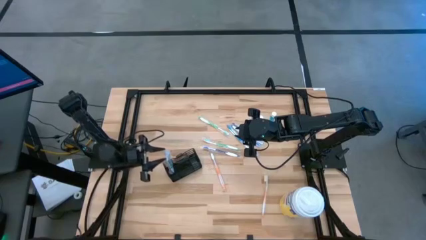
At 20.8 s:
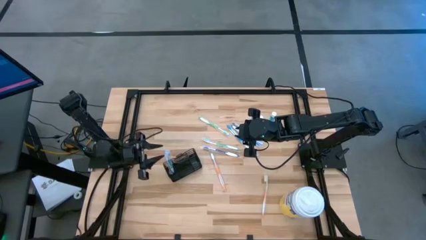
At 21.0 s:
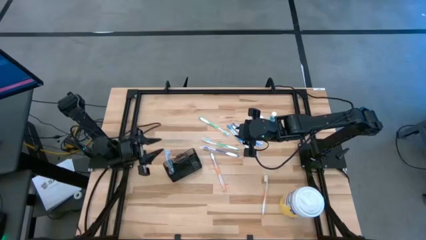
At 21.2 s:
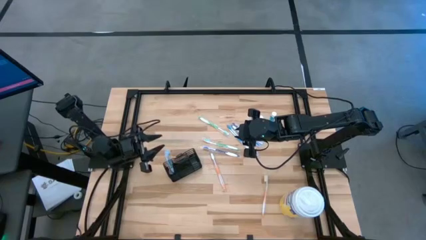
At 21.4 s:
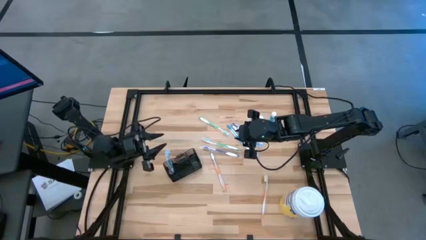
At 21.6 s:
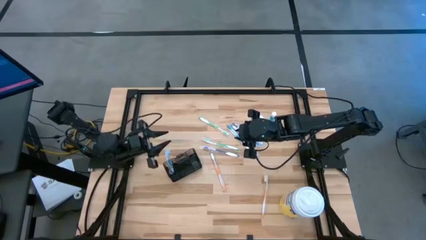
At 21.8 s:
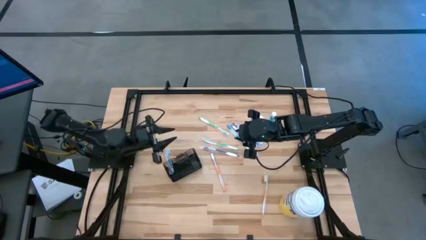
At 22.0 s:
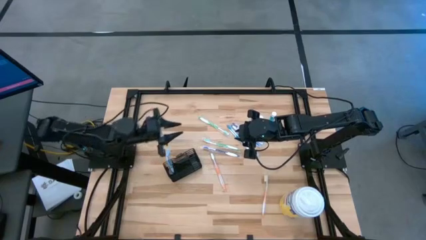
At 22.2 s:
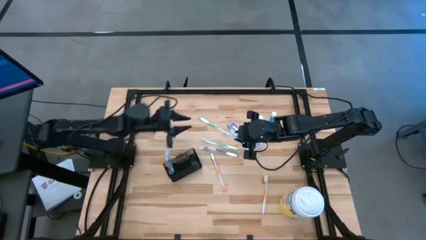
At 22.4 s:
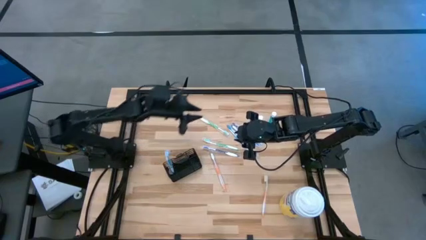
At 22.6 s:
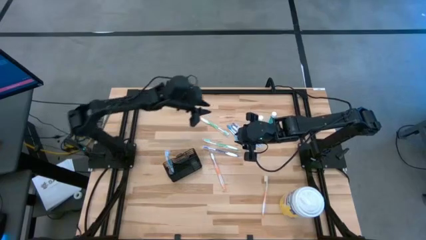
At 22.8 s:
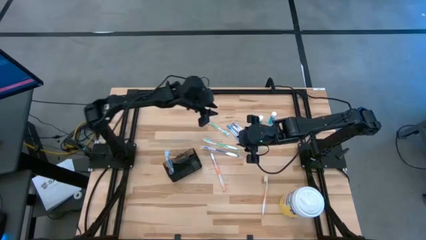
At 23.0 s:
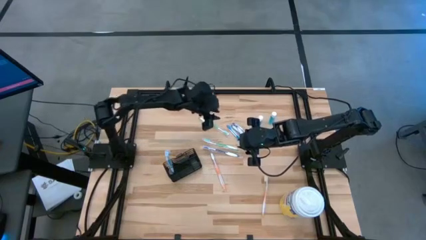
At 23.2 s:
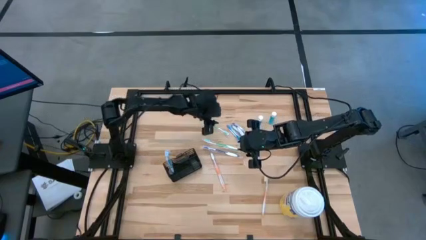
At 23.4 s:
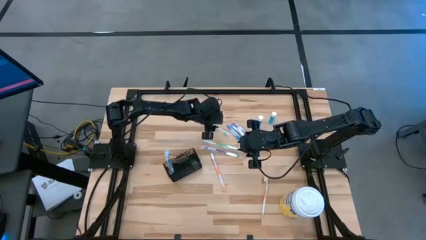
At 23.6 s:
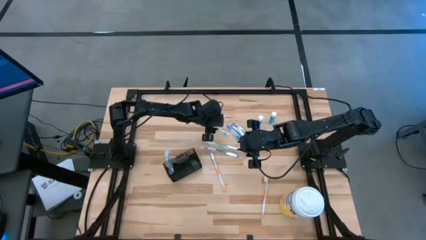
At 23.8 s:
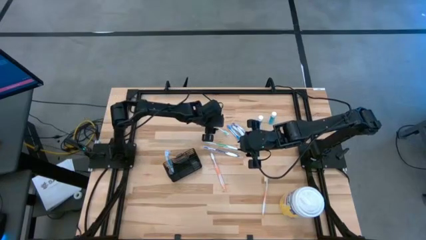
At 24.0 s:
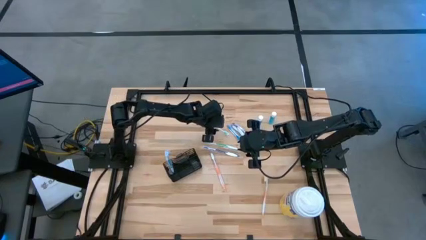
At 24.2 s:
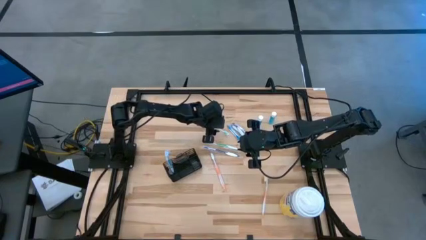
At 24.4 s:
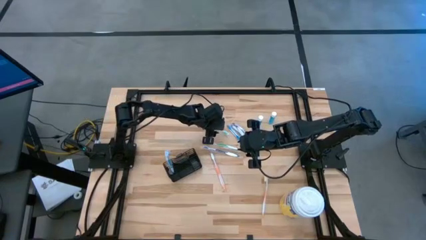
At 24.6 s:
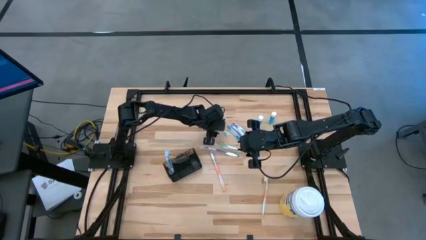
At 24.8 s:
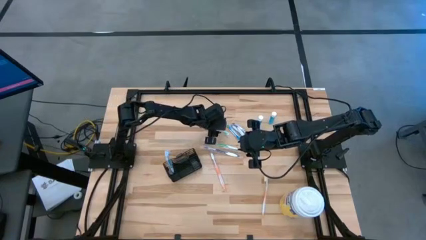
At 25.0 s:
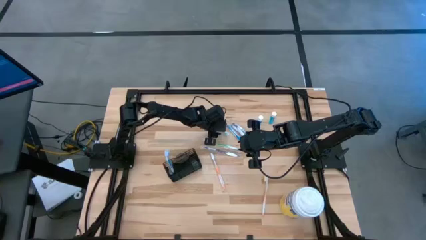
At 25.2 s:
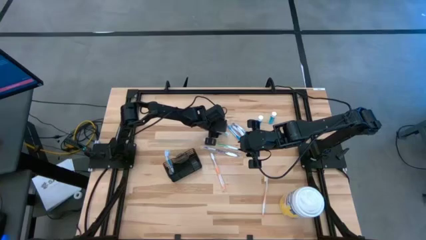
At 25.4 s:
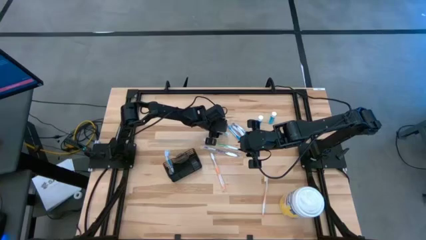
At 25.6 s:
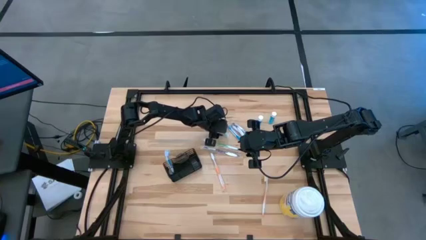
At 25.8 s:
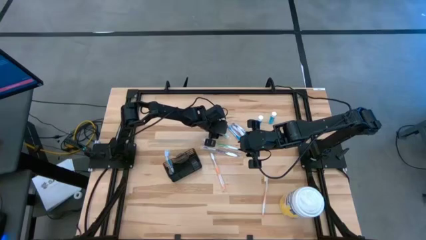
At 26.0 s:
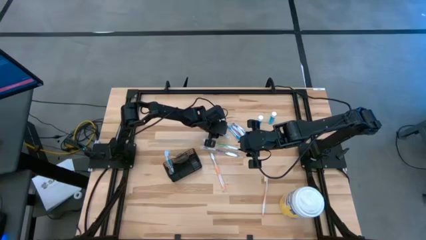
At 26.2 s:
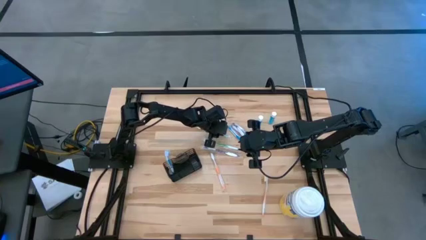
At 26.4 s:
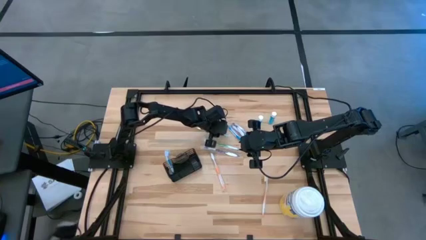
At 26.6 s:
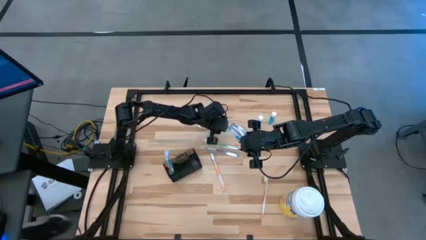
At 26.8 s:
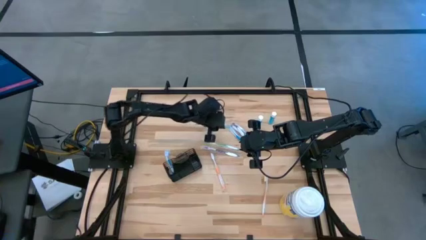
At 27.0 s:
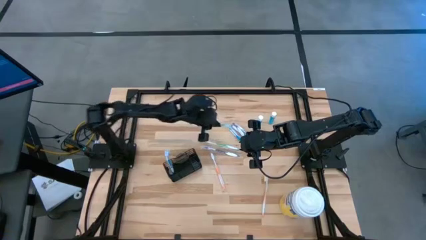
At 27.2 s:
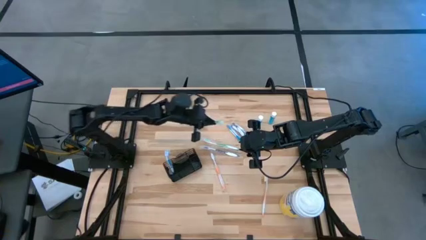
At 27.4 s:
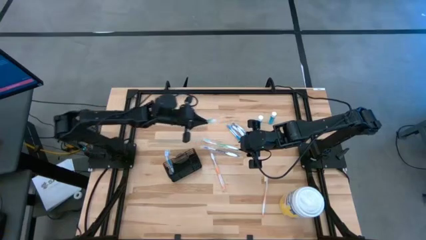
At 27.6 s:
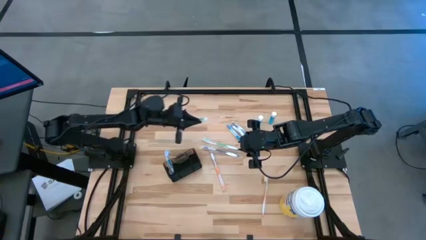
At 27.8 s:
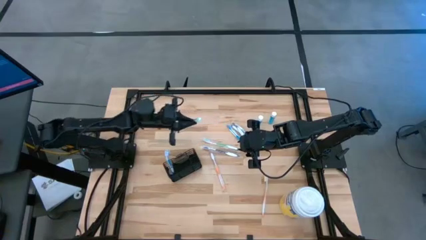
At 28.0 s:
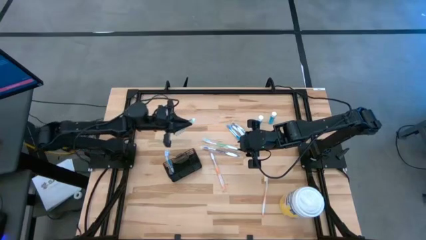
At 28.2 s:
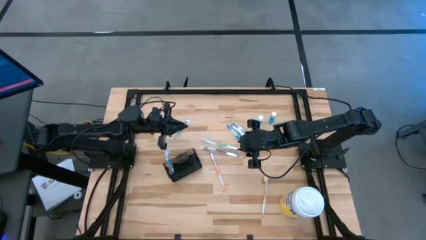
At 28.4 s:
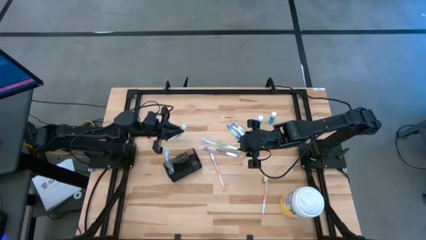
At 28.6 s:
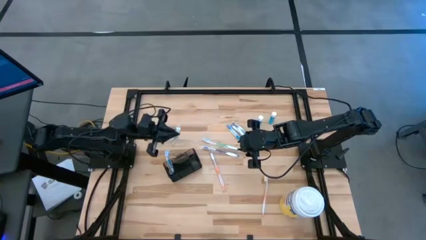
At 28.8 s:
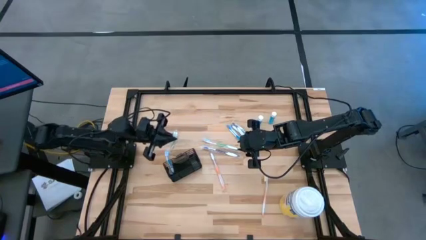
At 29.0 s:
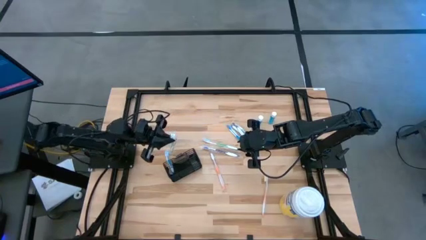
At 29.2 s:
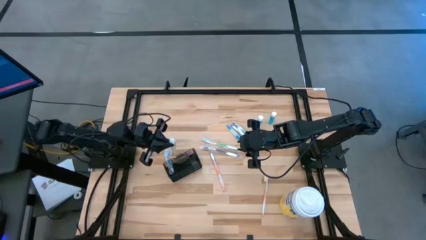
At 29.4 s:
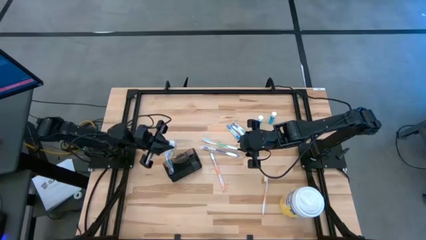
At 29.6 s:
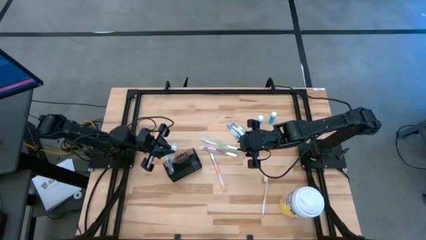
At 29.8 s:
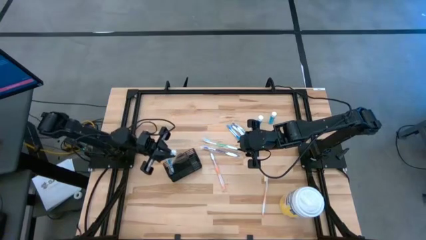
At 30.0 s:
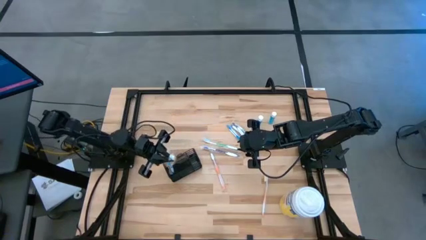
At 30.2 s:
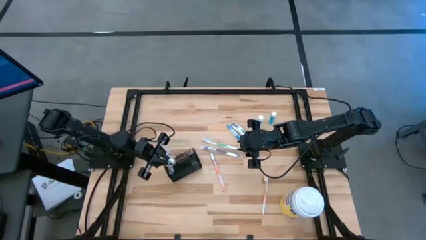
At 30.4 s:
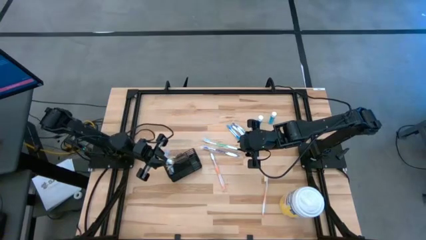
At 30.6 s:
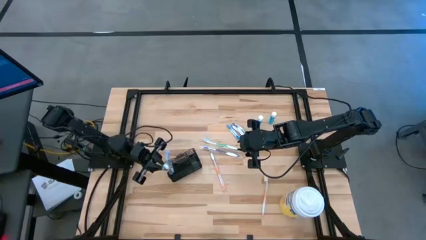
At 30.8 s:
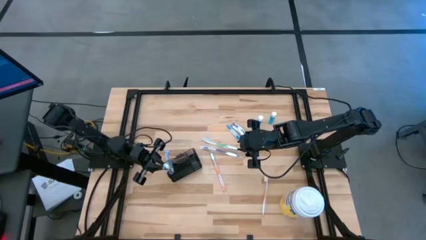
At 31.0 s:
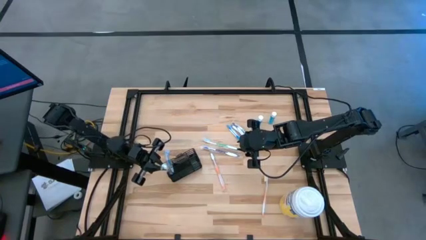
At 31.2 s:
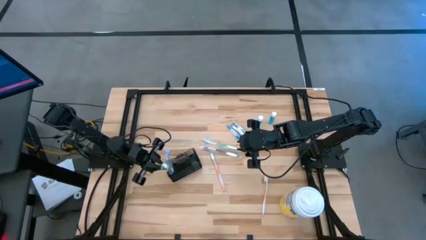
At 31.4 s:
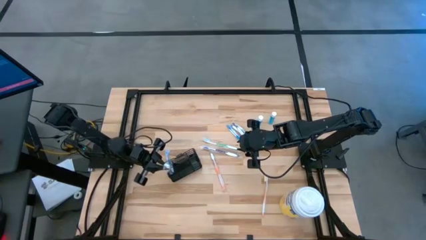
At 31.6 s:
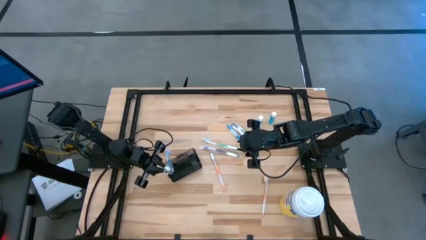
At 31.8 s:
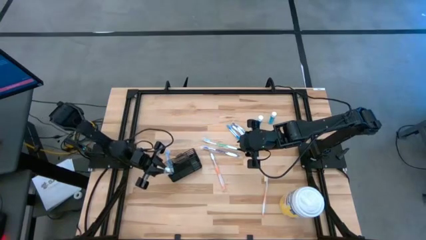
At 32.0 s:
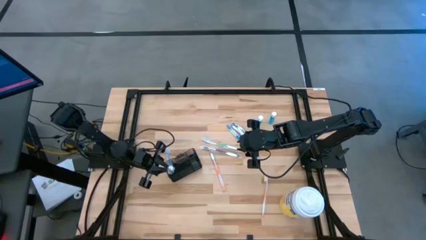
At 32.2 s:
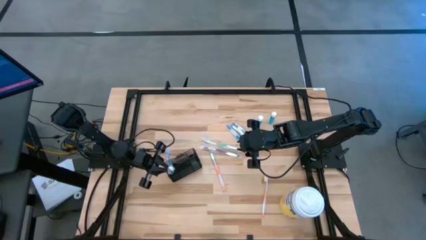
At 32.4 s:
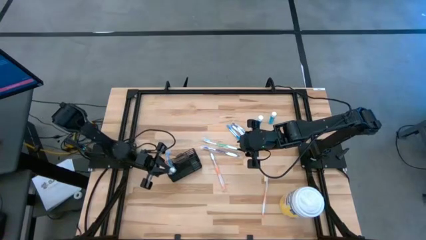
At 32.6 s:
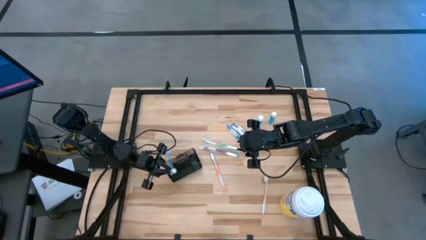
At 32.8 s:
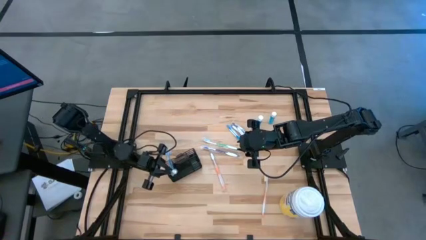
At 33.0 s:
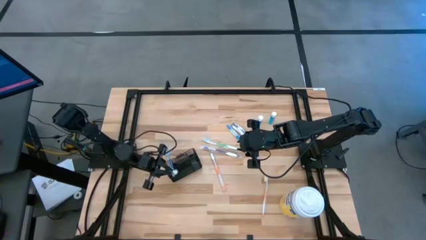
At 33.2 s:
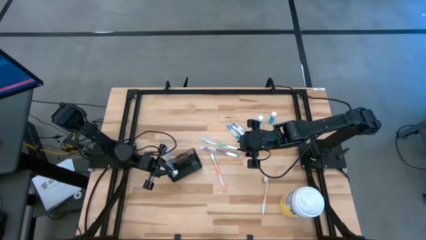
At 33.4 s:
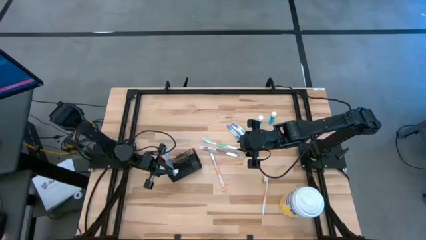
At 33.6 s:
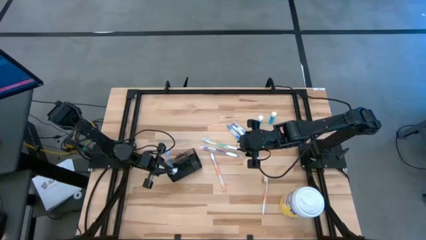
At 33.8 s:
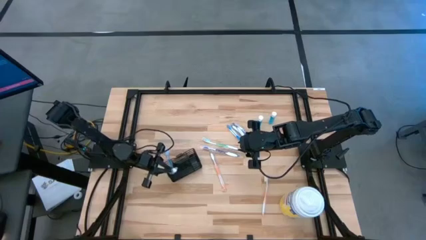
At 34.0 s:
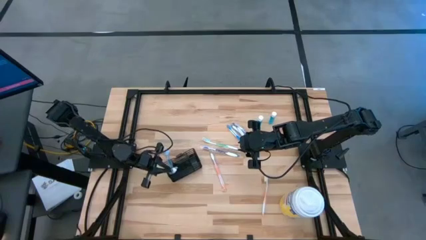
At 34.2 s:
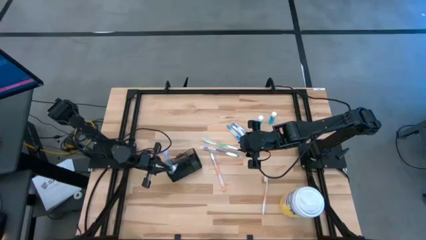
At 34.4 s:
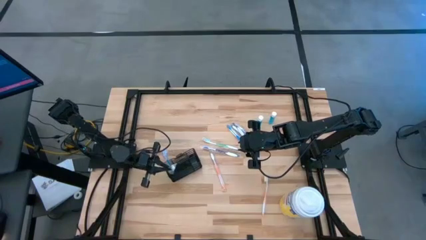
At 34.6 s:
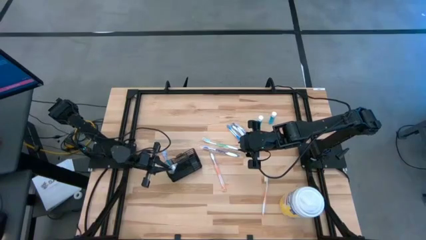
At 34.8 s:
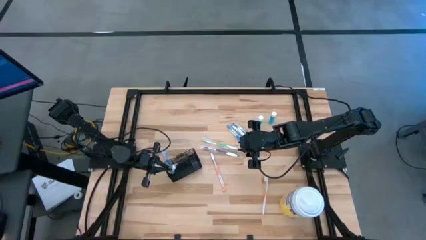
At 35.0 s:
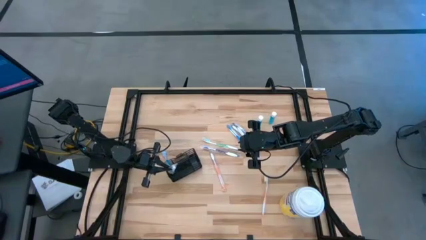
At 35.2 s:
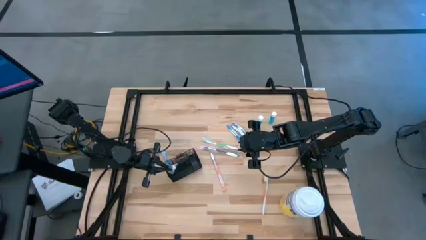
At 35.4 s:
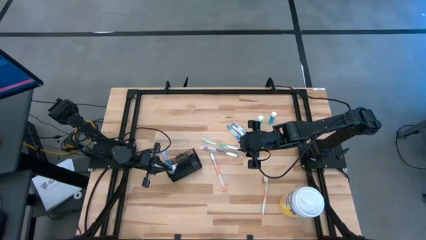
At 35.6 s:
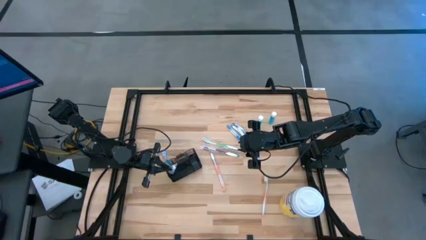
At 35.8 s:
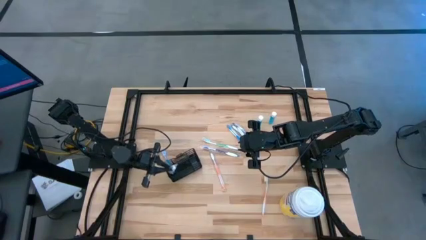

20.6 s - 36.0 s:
Task: Pick & Place toothbrushing station
Put the top green toothbrush into the bottom left section of the mesh organizer

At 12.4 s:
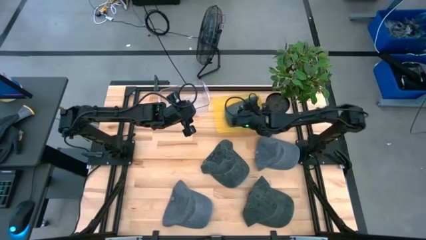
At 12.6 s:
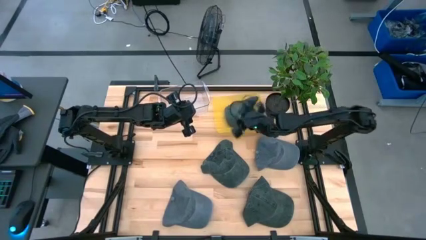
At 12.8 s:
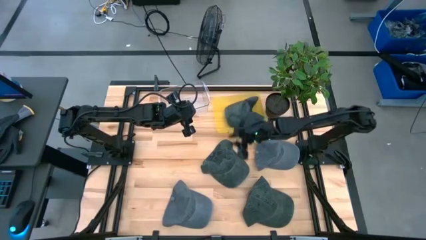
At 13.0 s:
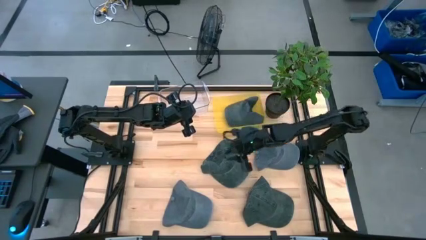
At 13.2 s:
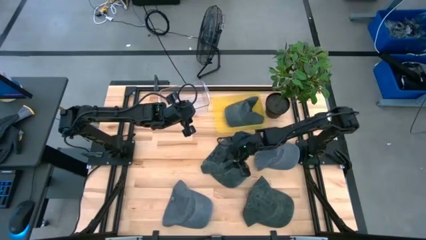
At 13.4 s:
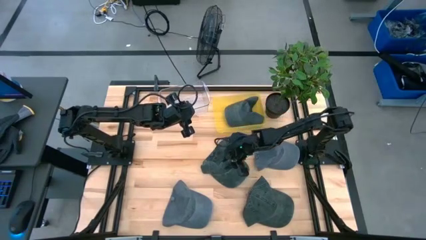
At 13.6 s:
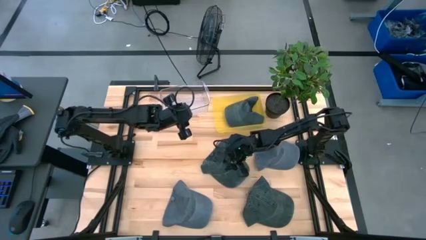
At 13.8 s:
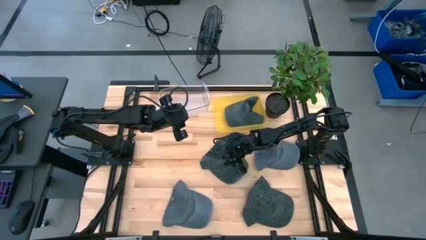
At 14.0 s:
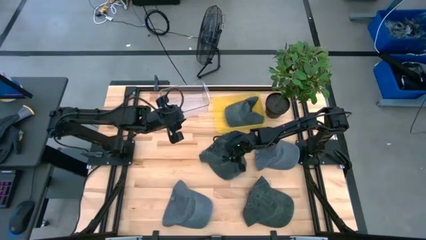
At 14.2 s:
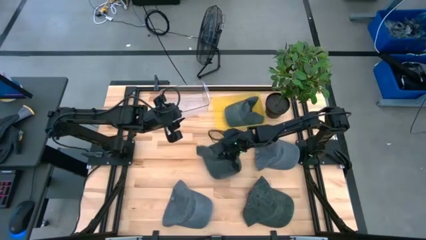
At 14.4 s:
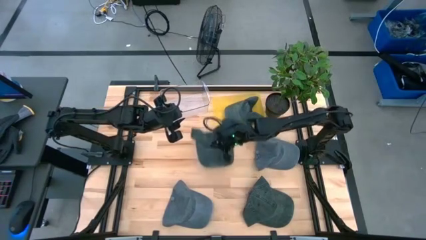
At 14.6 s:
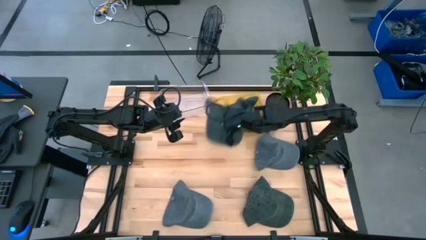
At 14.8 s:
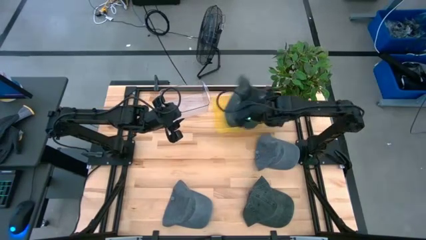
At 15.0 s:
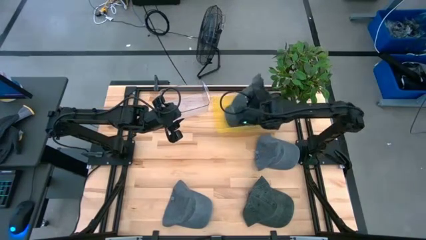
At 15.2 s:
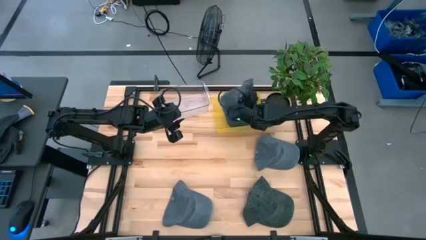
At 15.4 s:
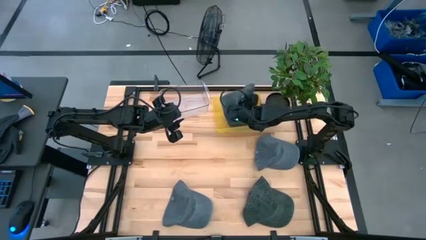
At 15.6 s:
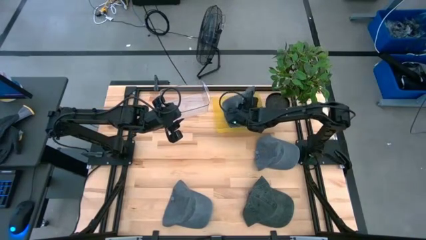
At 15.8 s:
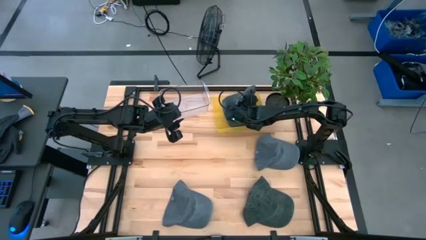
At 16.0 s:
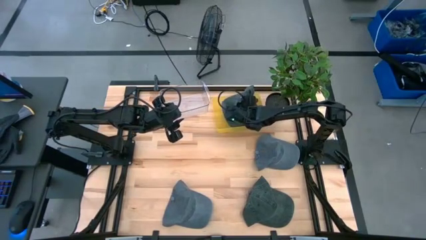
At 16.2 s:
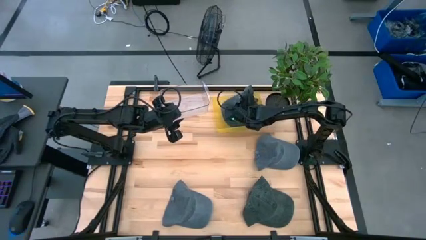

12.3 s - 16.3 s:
Task: Pick & Place hat
Put the top black cap into the yellow bin
